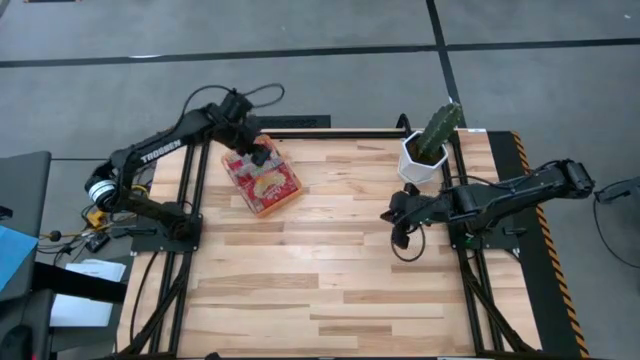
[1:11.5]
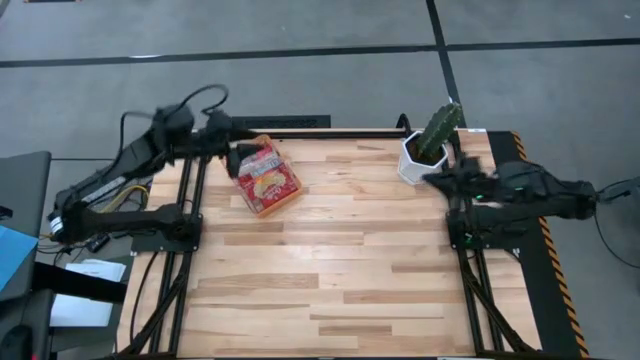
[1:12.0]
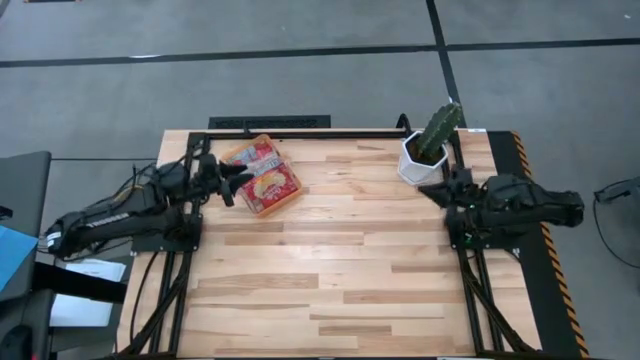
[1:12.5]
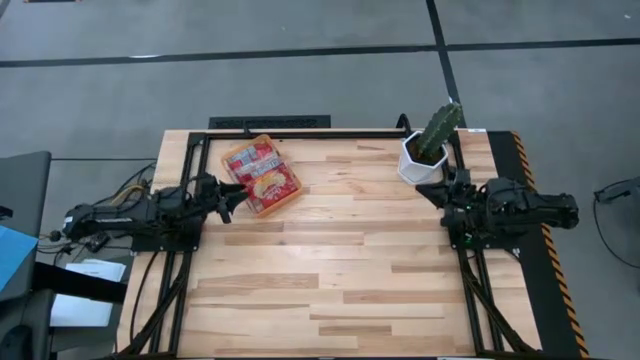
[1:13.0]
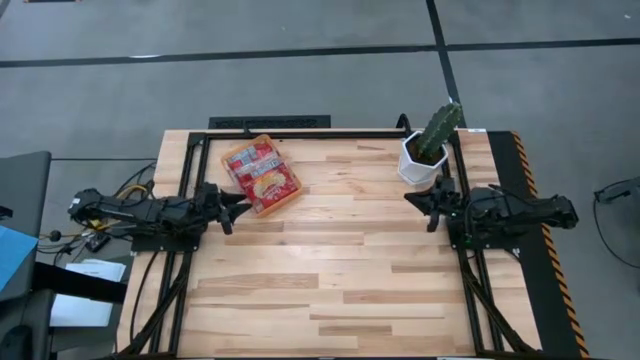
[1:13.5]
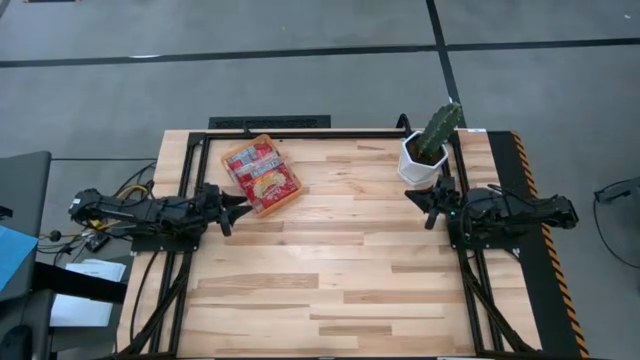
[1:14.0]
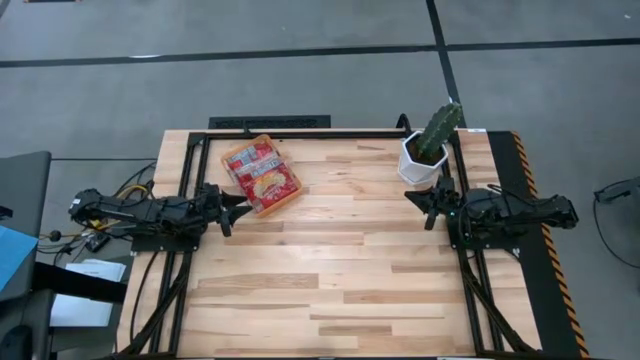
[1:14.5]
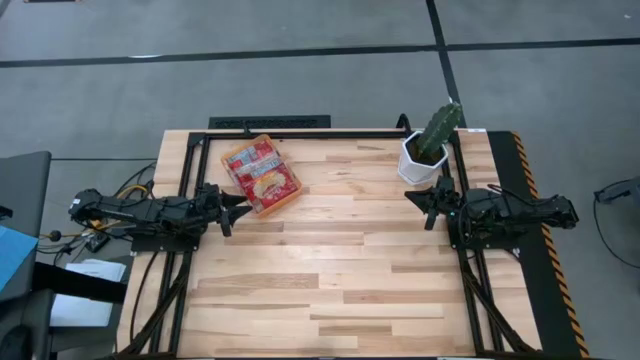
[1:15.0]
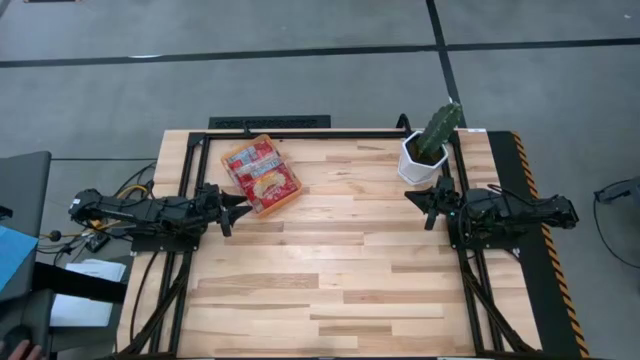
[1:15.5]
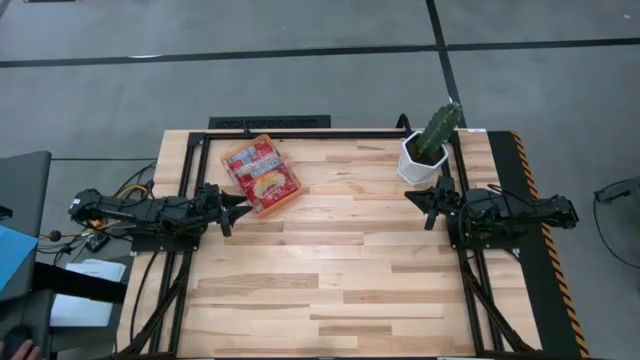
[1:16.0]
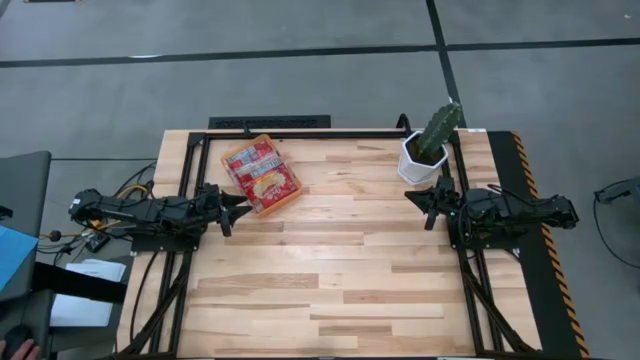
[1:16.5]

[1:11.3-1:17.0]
Task: Sort popcorn bags into baskets
Return to Home Position

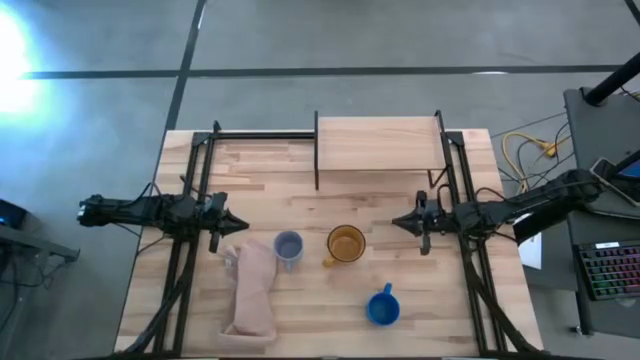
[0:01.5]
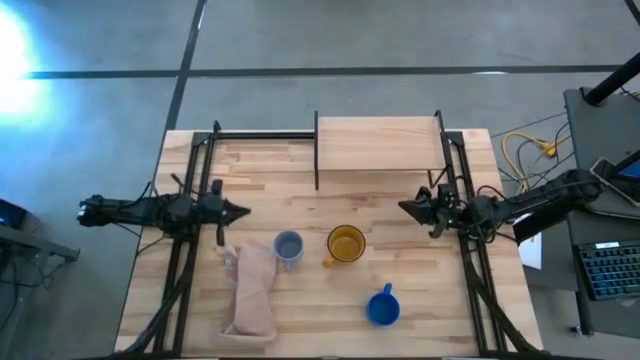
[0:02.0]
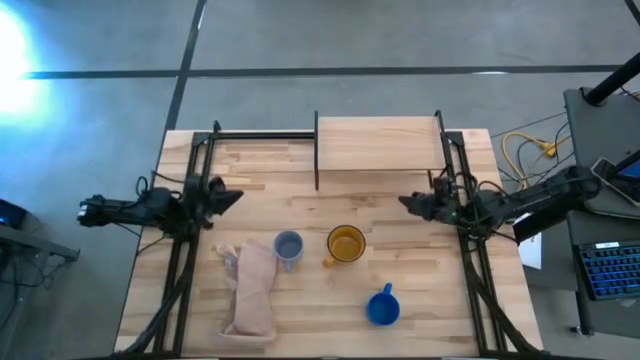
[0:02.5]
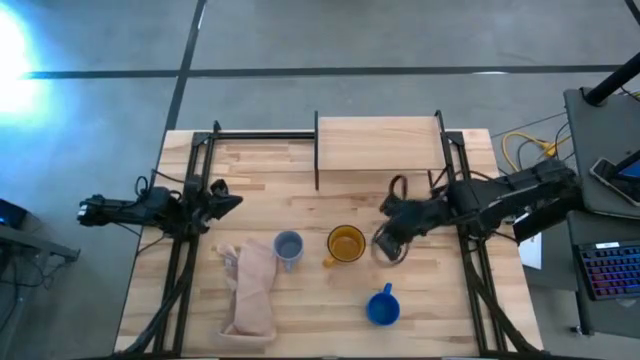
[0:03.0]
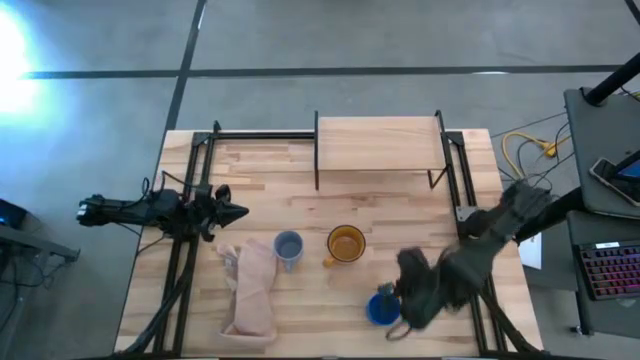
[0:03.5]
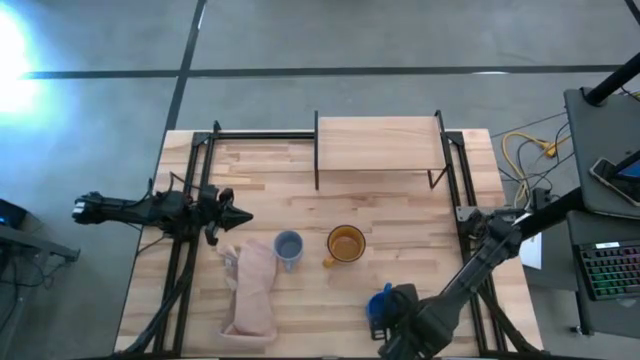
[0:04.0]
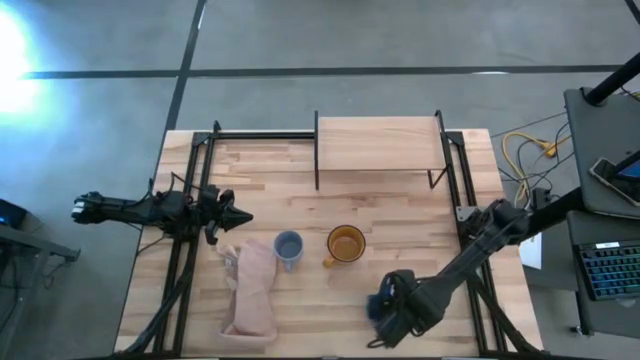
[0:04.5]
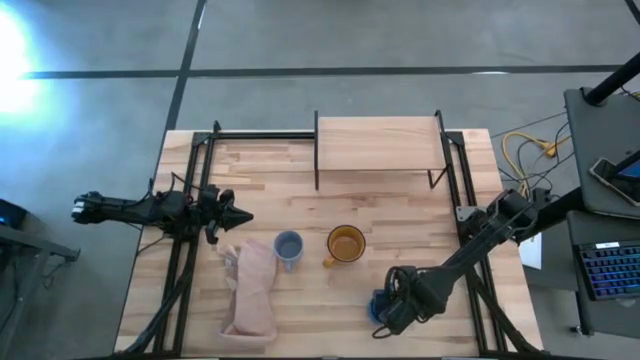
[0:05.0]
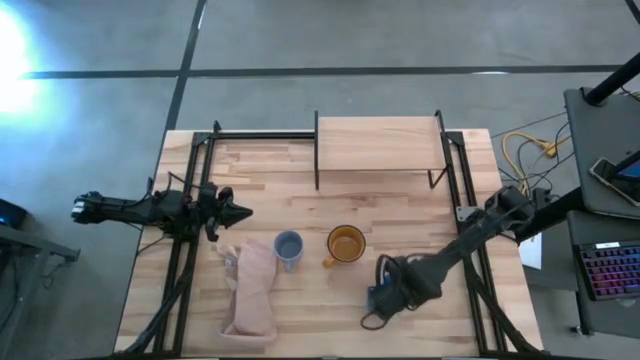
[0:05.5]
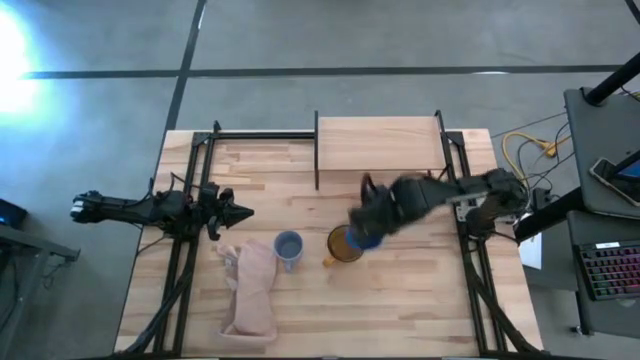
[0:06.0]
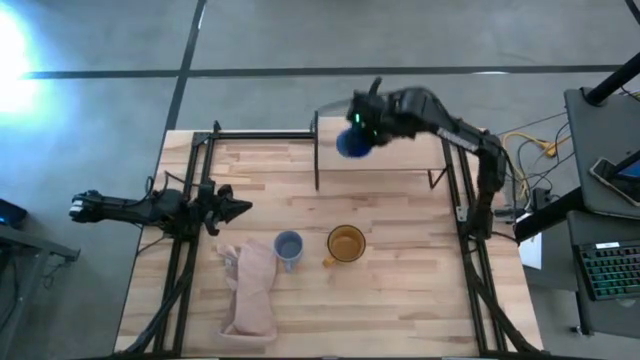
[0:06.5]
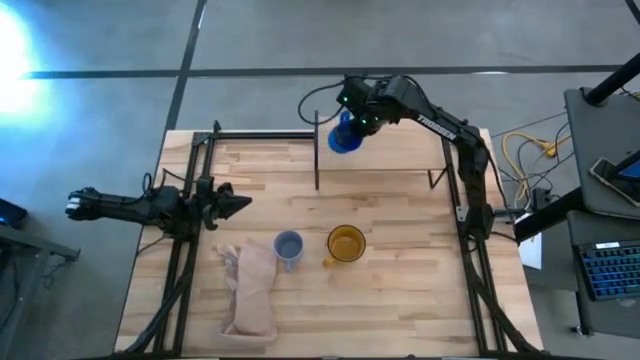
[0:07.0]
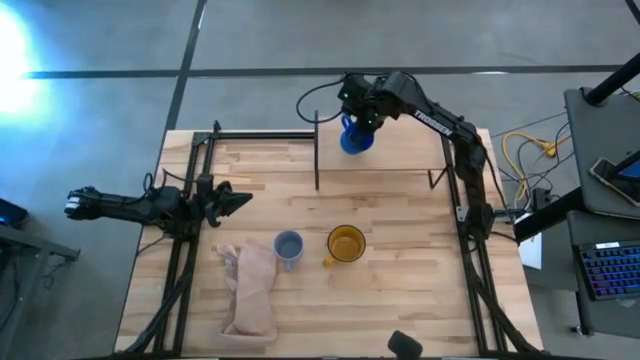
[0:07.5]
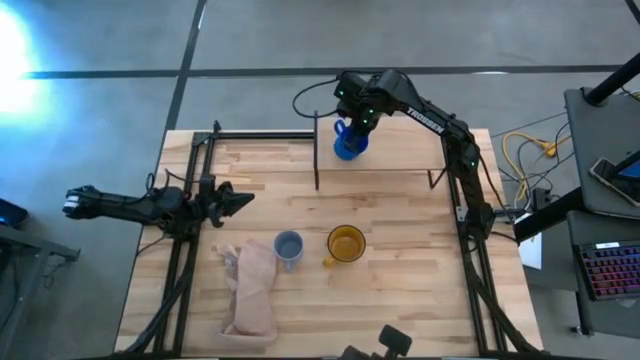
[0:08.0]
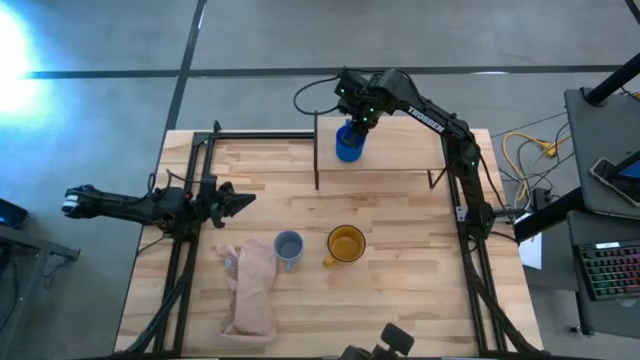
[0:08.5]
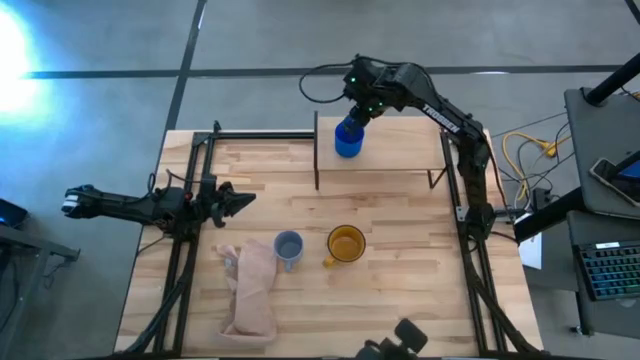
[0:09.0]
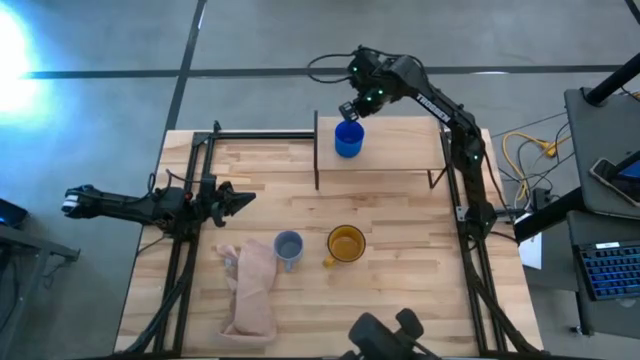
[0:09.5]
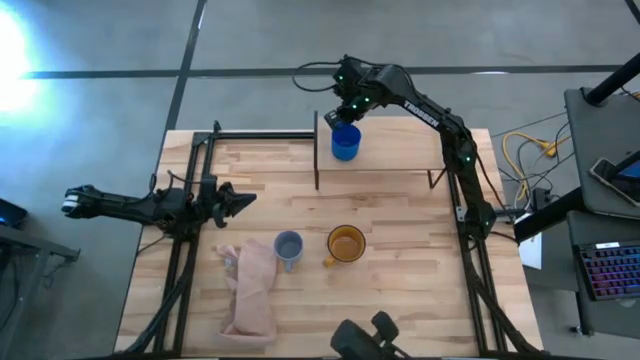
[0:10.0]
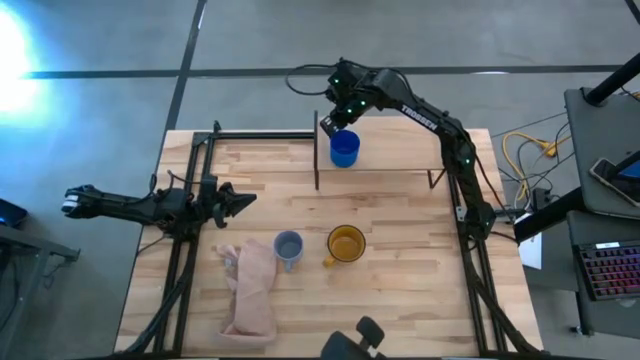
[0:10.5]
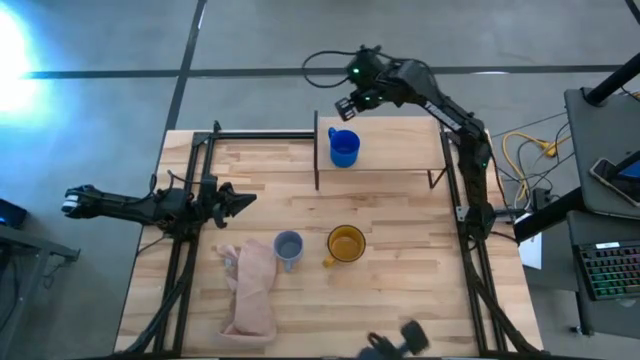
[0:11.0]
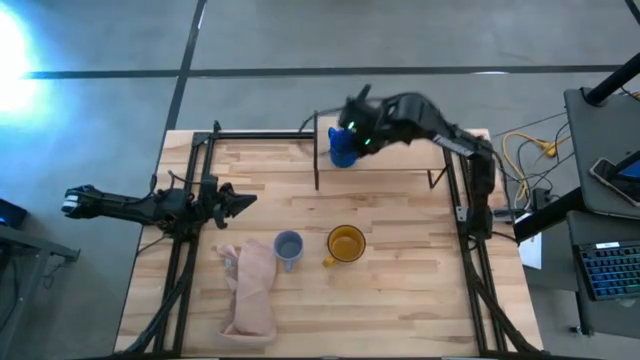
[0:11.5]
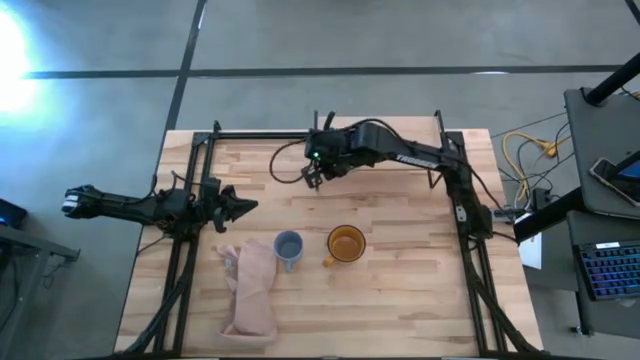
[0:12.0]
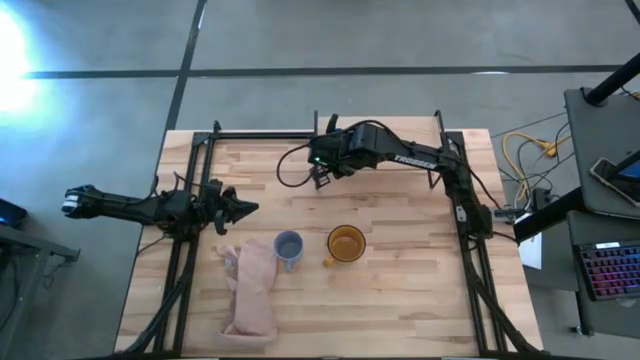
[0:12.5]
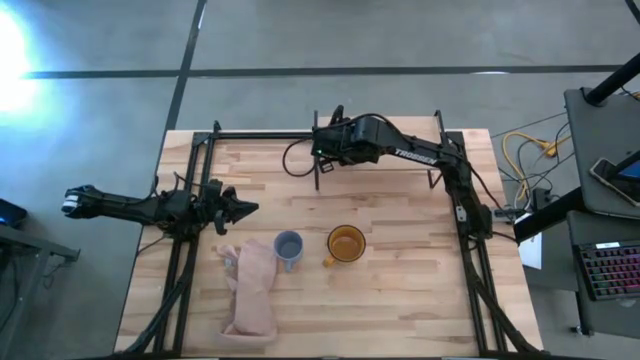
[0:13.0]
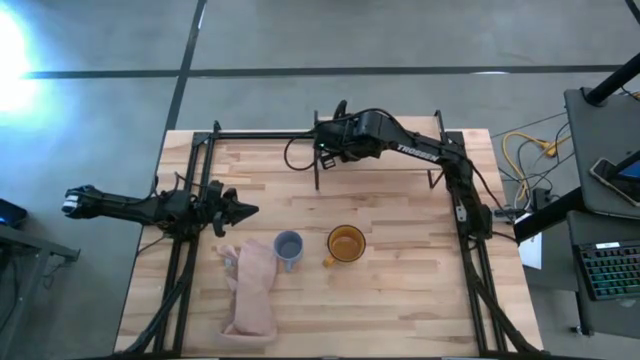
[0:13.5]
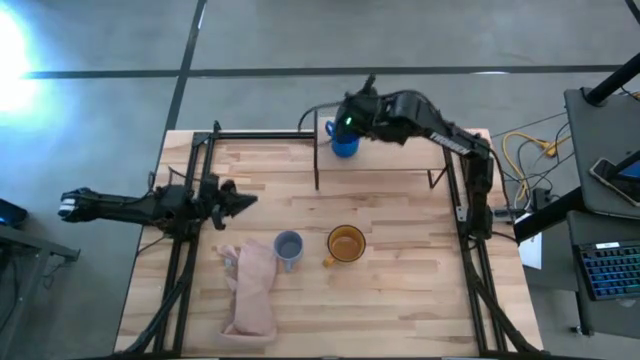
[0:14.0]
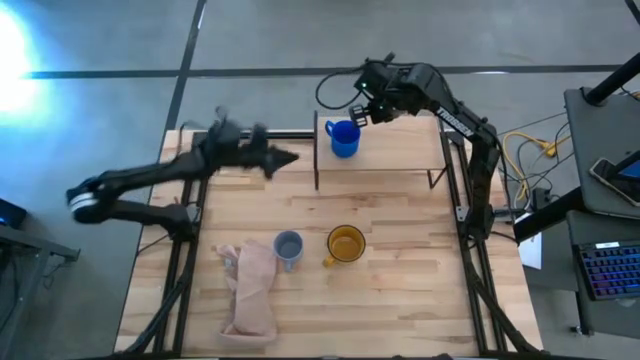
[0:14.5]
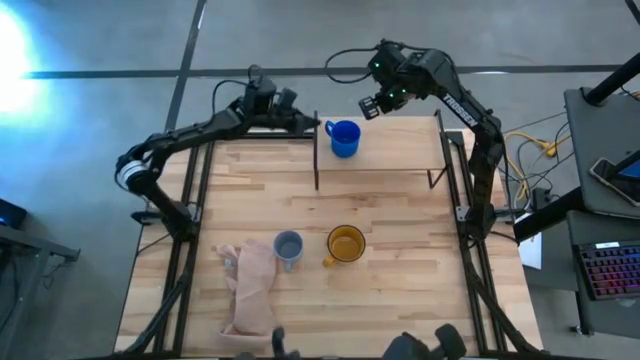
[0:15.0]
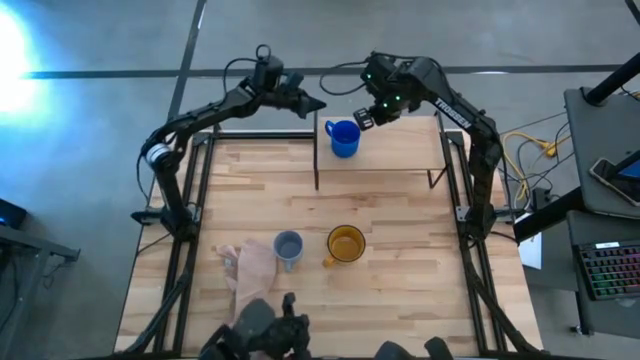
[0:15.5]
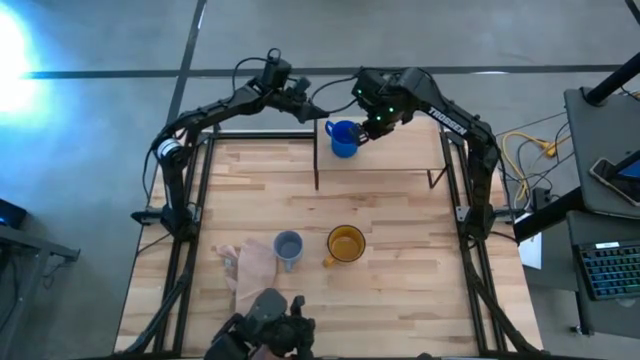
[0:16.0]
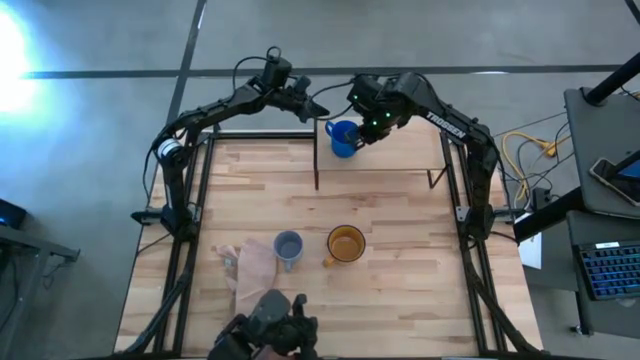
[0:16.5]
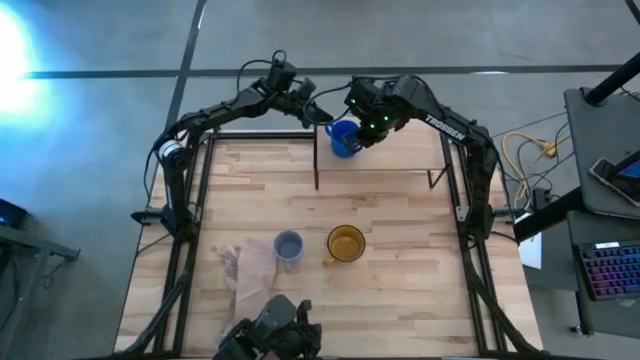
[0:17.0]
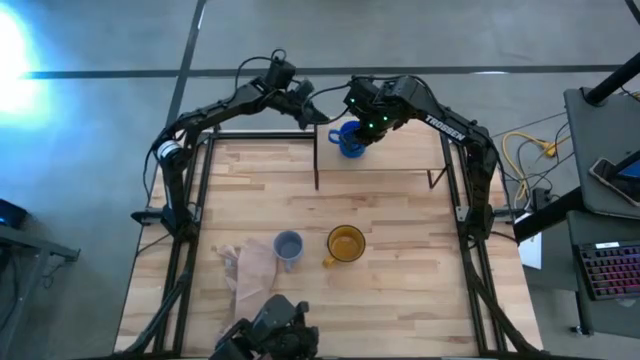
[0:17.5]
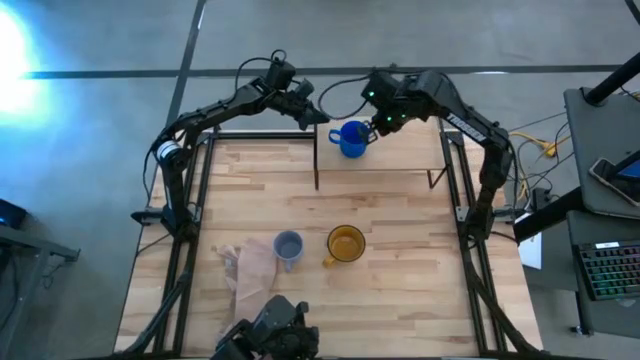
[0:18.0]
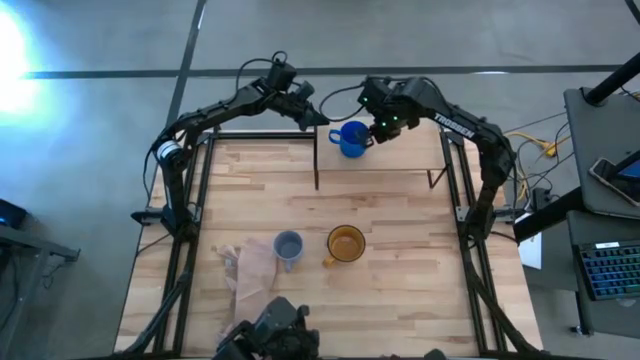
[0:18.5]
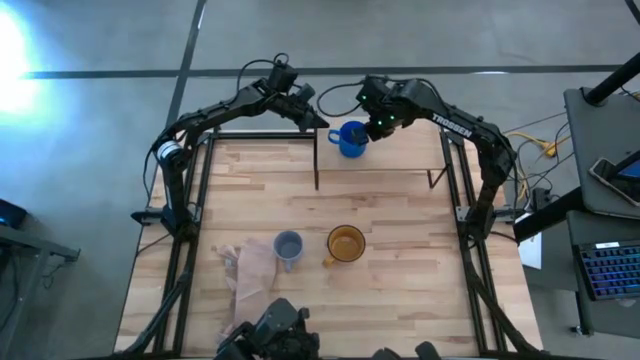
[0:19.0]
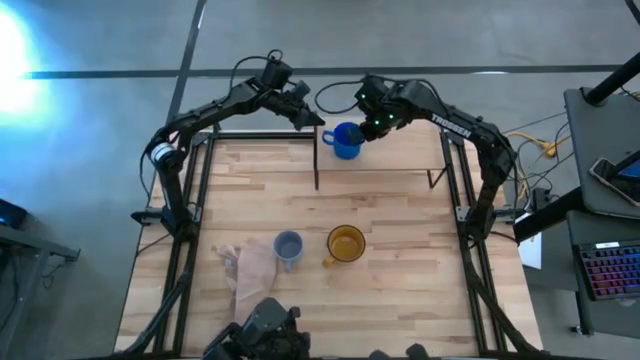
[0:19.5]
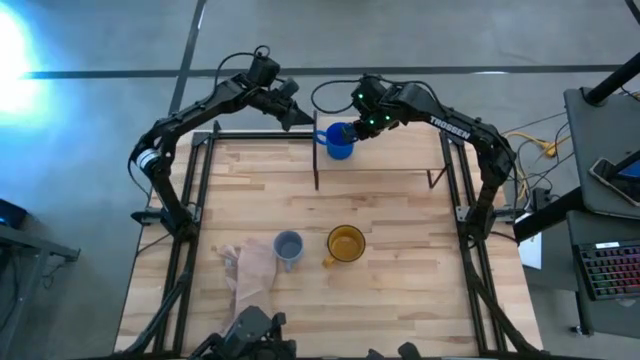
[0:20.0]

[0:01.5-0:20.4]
Task: Stack small to large cups/mugs on shelf
Put the blue mug on the shelf
